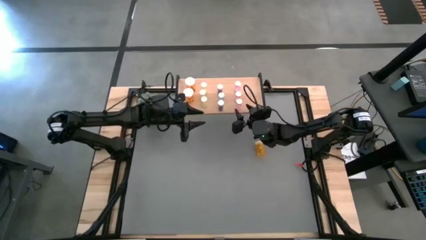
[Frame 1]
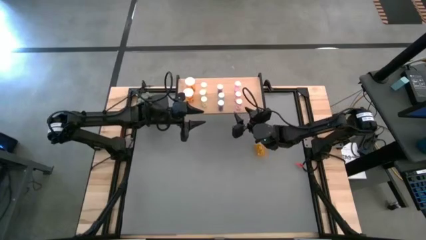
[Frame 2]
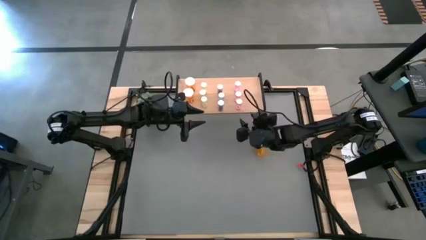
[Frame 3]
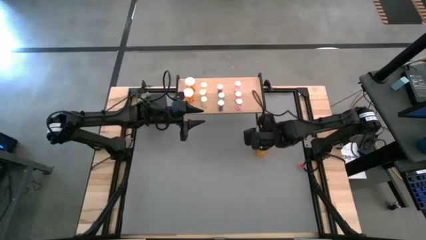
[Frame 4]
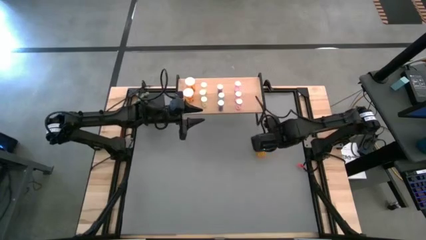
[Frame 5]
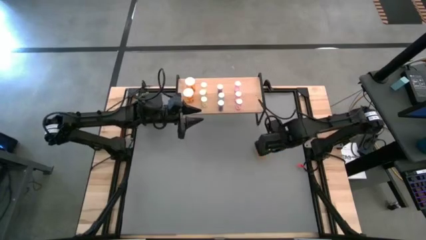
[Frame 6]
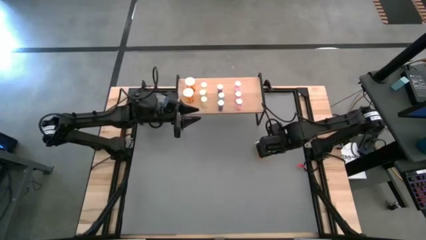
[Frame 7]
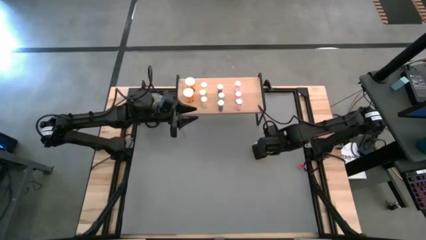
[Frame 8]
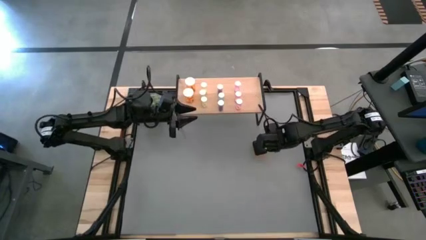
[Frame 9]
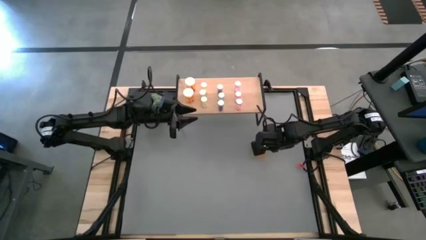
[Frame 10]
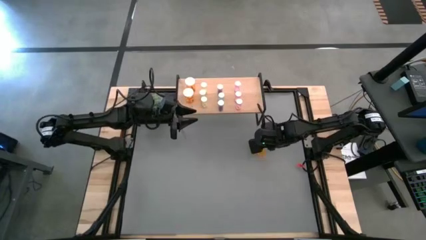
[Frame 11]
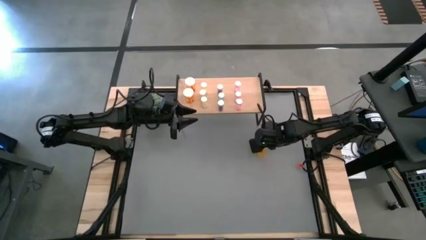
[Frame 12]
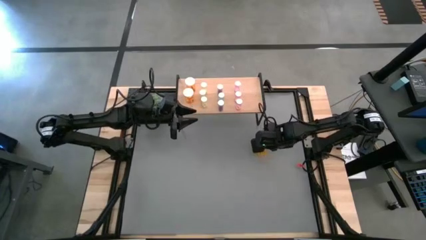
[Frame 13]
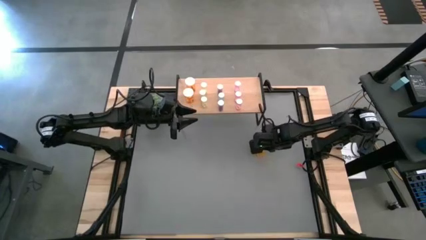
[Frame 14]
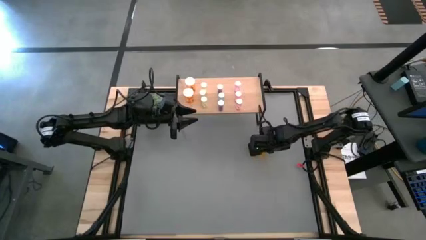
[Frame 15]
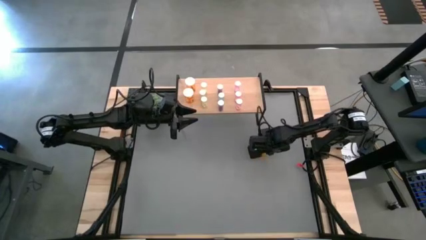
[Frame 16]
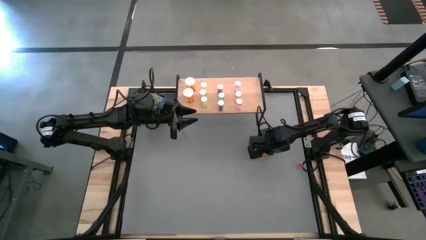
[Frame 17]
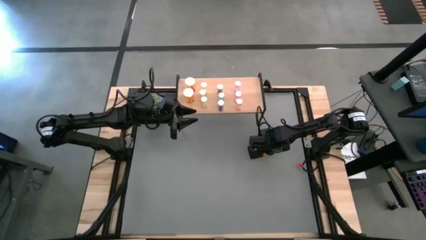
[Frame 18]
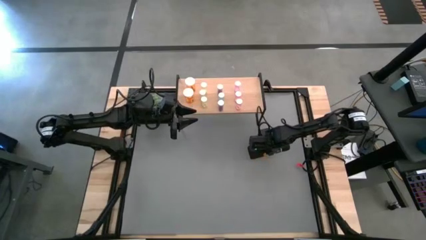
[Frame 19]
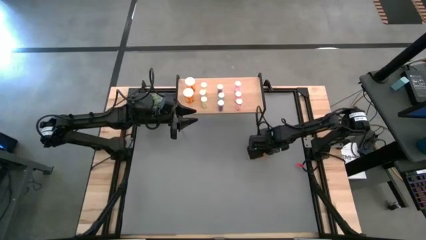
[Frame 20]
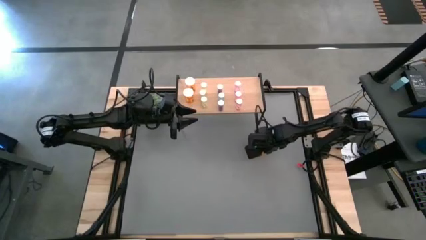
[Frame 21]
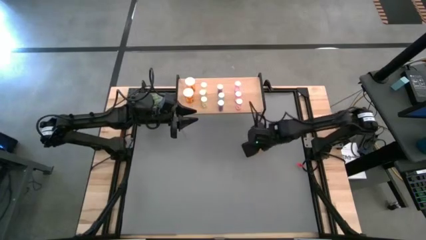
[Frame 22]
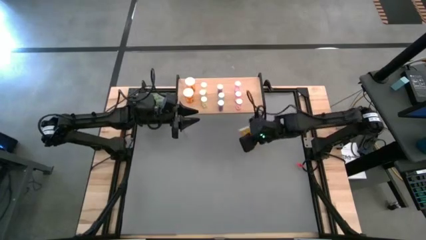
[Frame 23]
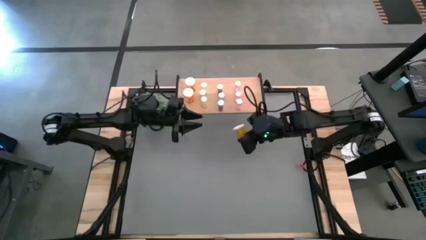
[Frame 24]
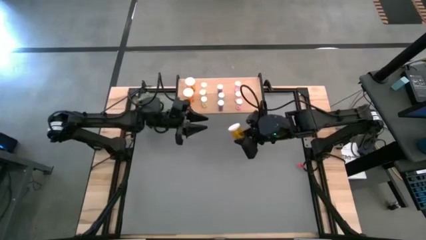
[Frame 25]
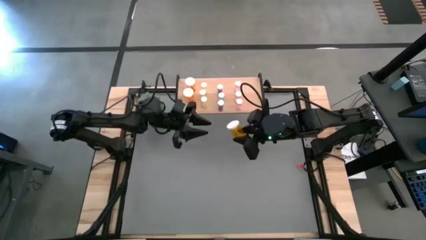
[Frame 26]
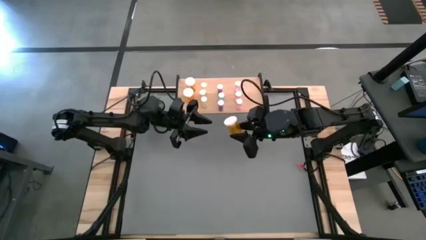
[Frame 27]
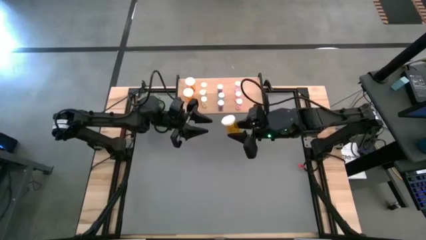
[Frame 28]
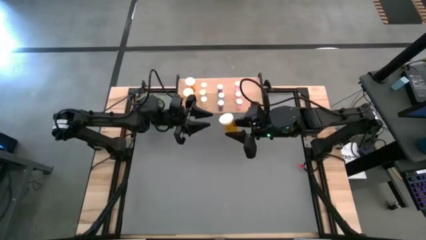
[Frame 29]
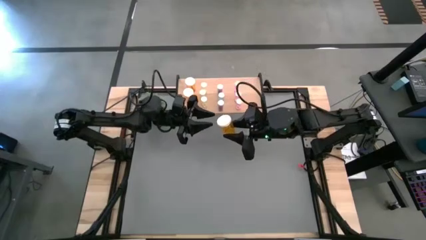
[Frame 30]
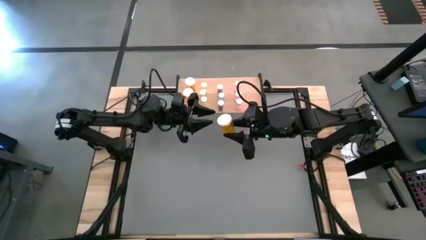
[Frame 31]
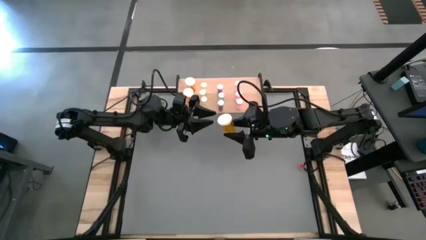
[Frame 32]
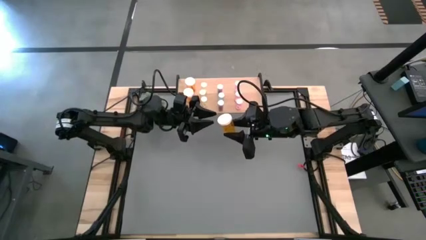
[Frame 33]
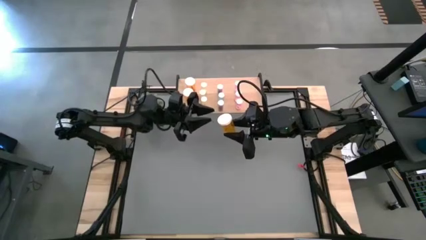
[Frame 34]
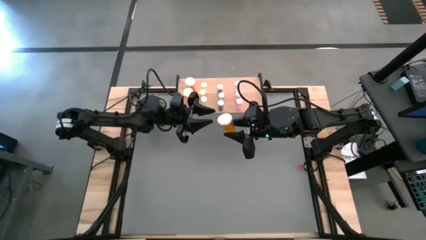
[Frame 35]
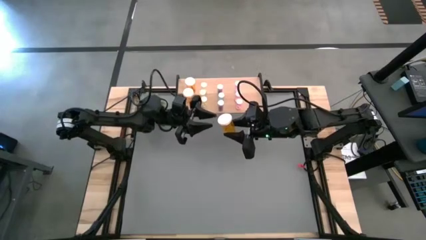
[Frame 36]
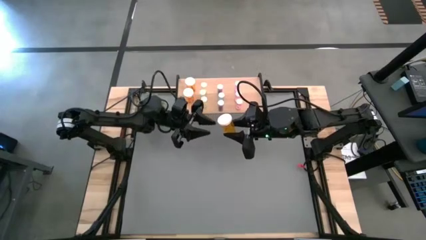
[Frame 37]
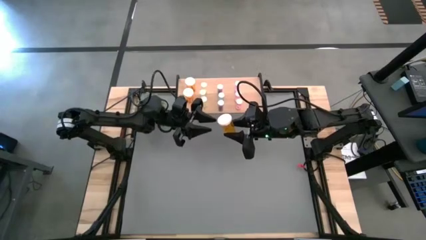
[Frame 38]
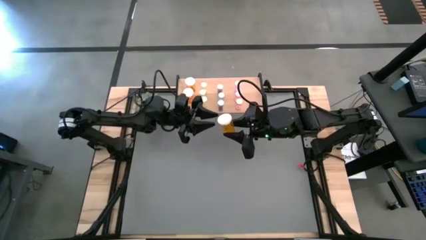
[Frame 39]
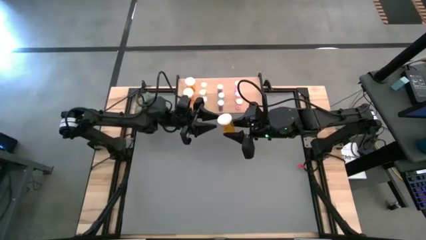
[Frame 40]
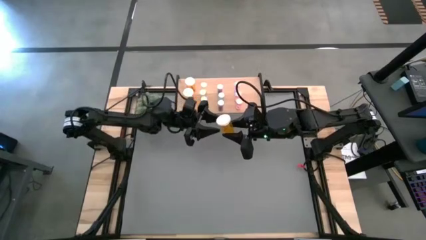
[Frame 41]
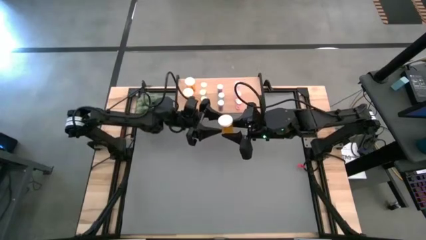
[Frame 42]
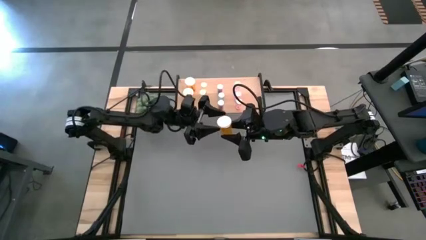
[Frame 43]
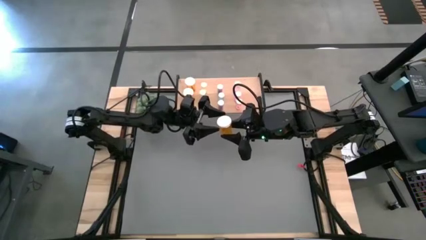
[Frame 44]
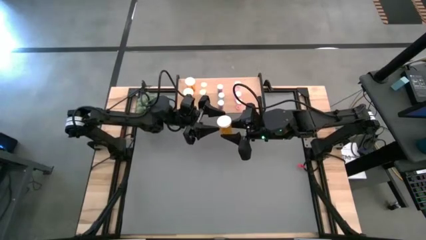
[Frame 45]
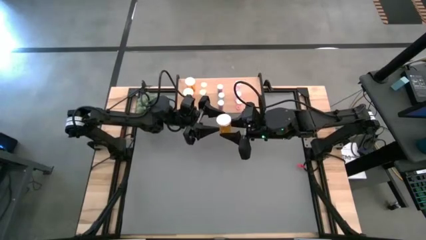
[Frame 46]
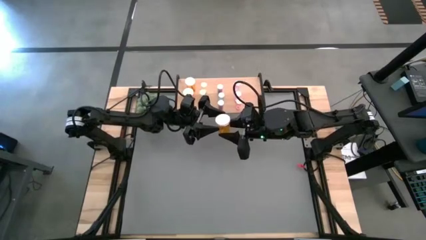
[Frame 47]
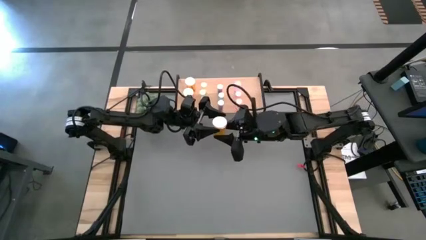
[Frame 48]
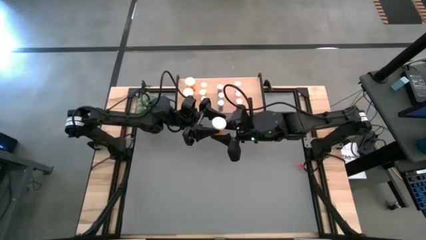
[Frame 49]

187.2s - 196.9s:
Task: Pick and place medicine bottles onto shelf by color
Put the orange pill bottle on the shelf aligned with the other orange pill bottles

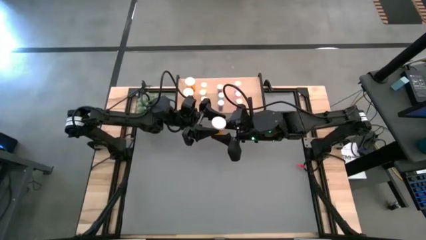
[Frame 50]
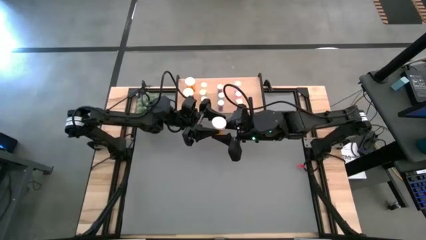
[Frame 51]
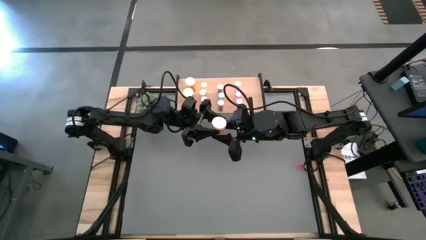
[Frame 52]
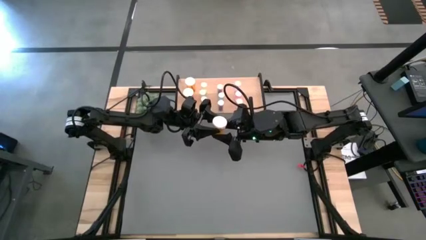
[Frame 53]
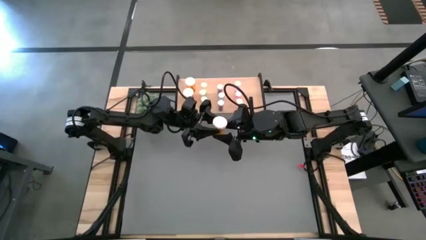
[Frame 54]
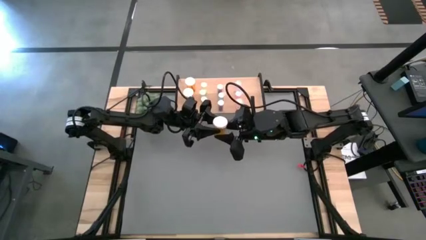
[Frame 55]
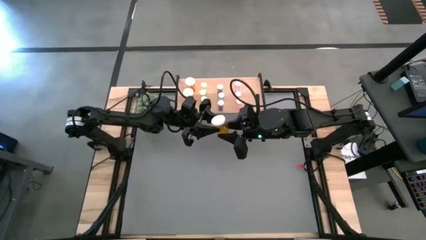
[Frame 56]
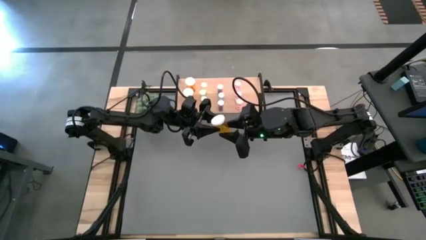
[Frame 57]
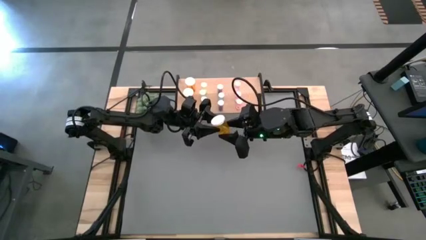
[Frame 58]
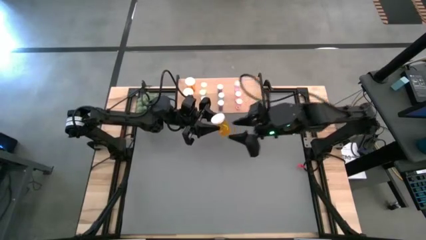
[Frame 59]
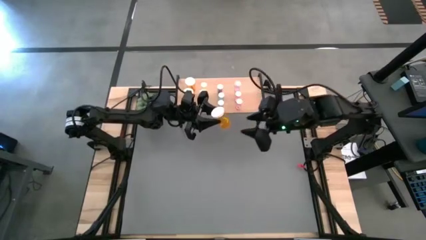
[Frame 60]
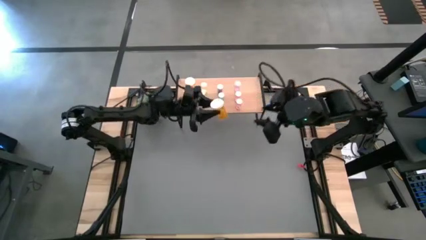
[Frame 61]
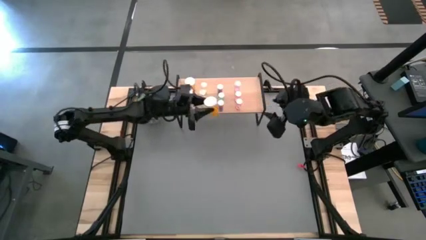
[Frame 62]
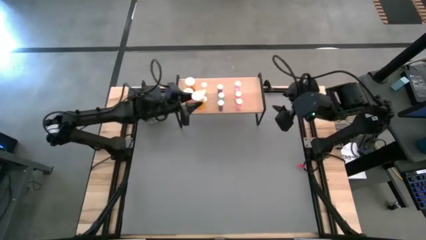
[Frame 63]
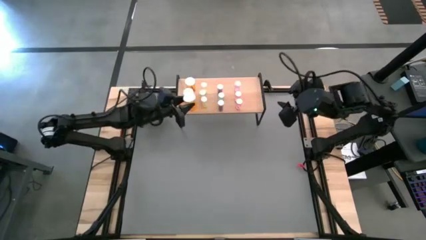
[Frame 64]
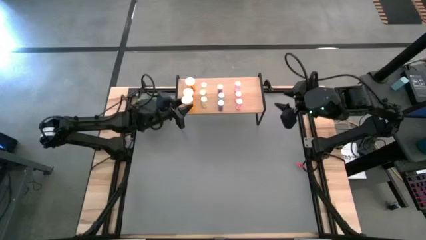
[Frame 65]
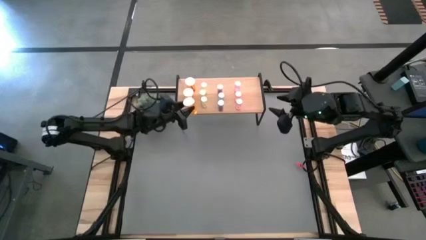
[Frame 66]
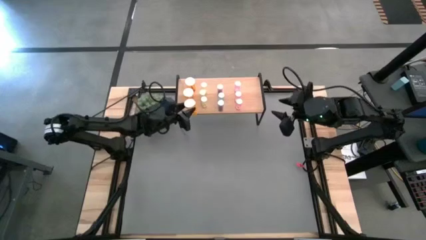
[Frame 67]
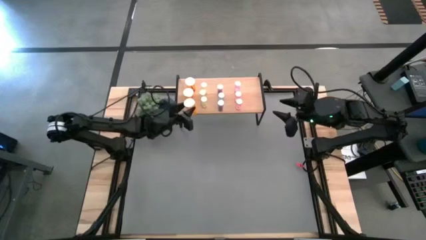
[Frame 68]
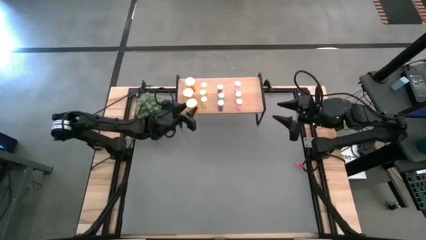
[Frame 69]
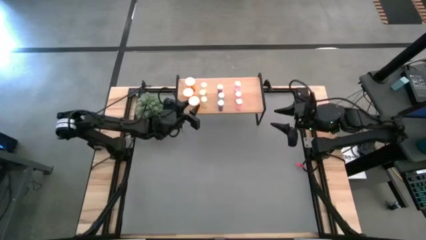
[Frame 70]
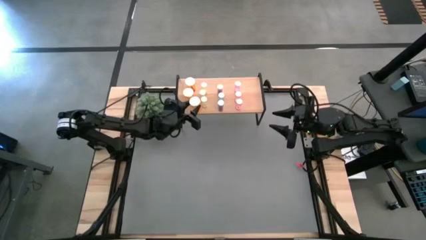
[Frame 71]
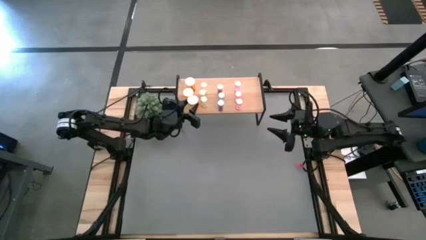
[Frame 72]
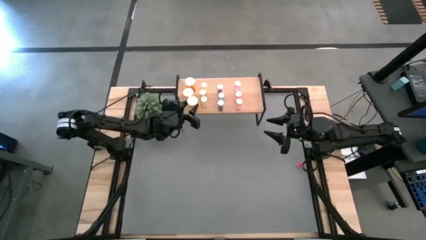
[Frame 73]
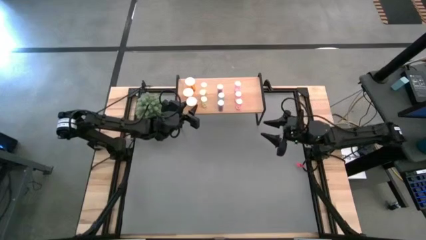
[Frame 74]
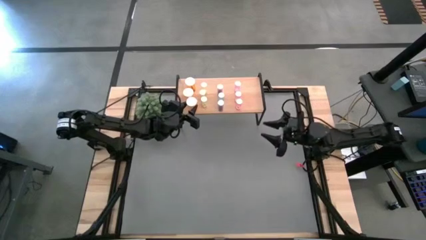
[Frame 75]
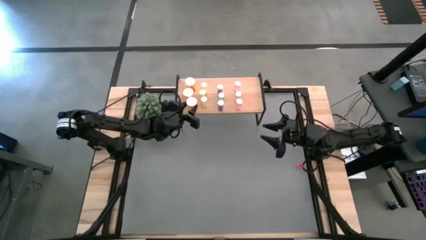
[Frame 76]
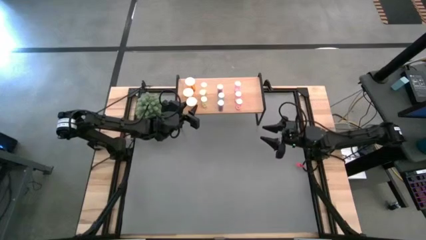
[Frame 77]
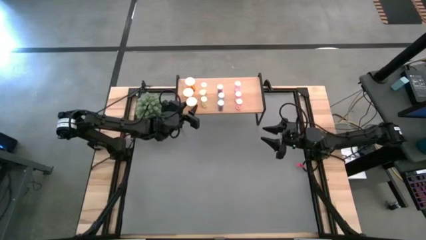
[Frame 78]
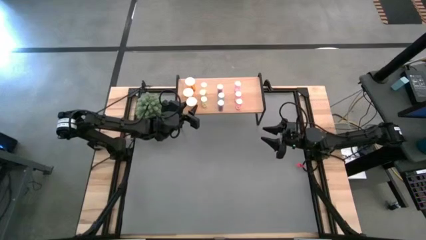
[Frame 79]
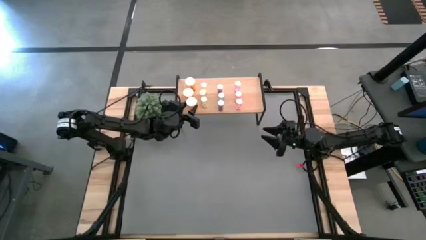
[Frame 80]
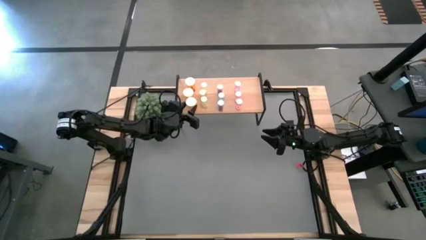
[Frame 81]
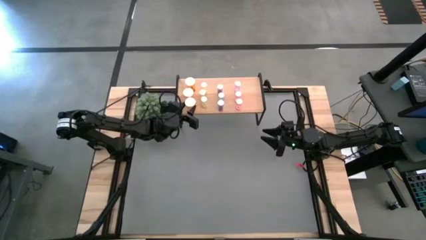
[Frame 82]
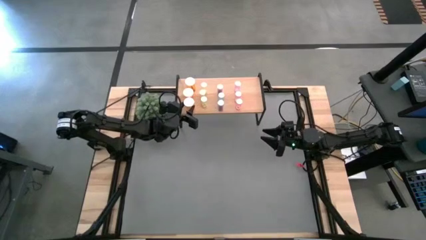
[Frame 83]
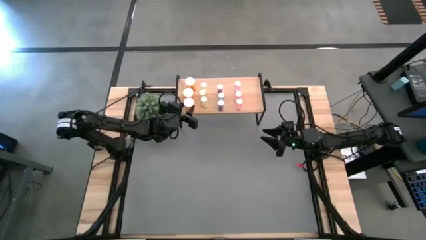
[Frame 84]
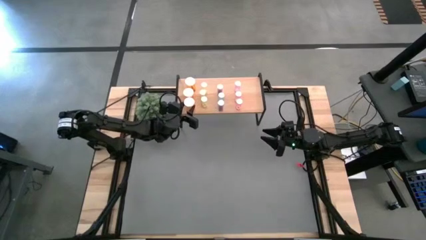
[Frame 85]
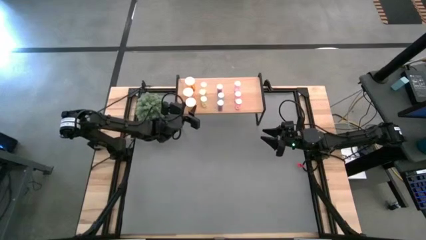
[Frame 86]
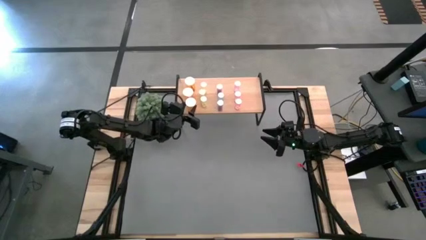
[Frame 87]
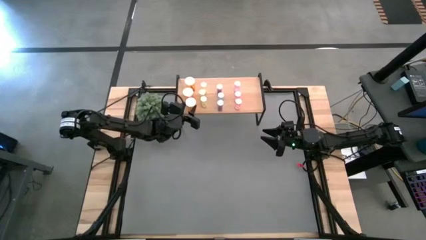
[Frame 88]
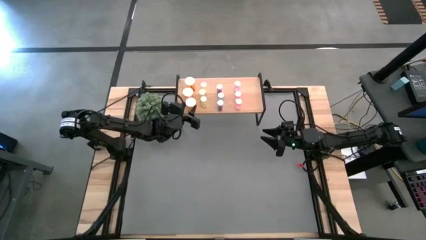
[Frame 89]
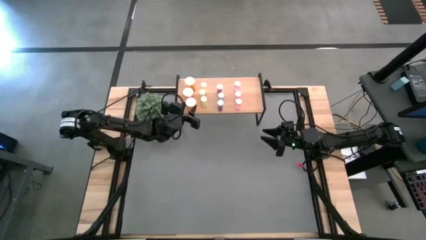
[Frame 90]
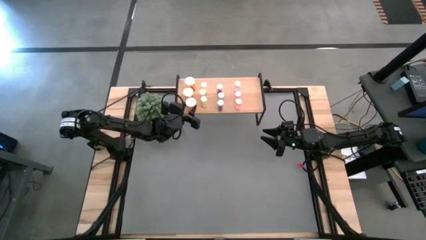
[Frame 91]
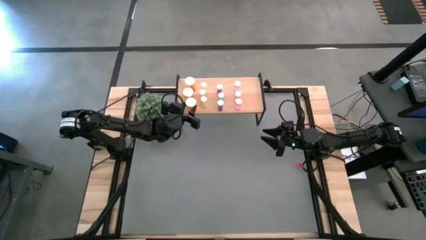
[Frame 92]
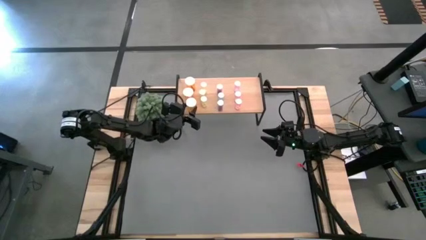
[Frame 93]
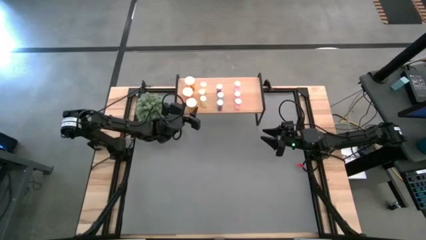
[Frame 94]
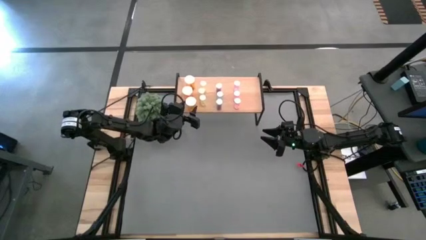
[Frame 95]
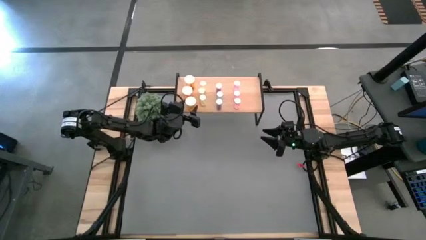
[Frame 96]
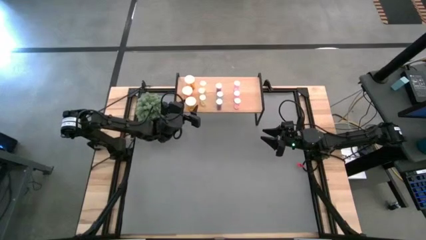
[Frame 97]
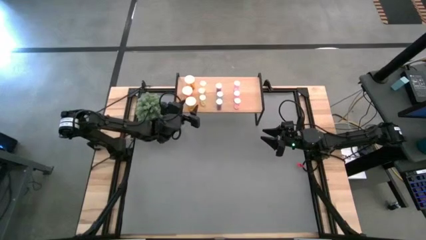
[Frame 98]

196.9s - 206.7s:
Put the orange pill bottle on the shelf aligned with the other orange pill bottles
